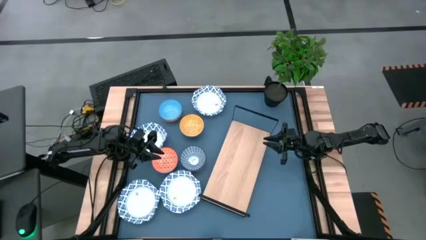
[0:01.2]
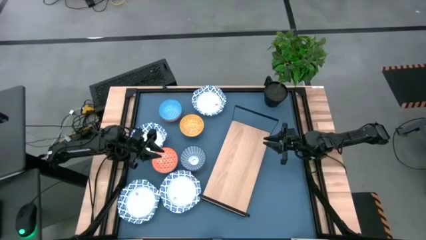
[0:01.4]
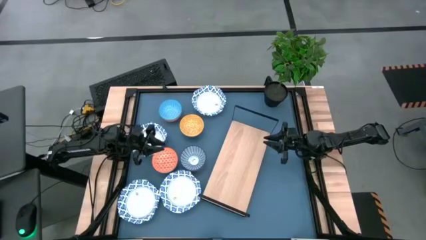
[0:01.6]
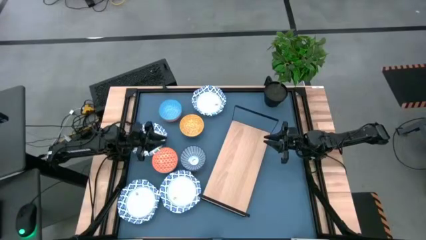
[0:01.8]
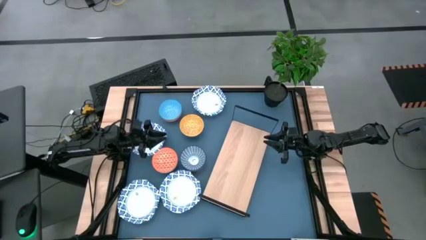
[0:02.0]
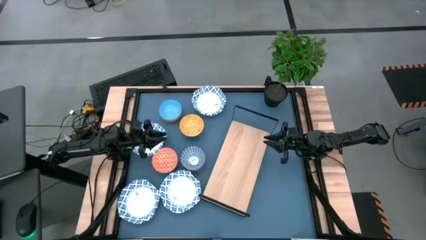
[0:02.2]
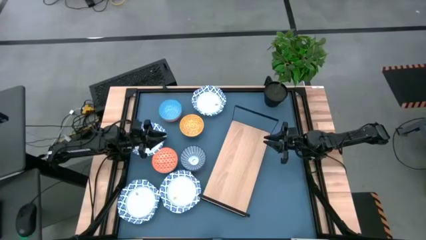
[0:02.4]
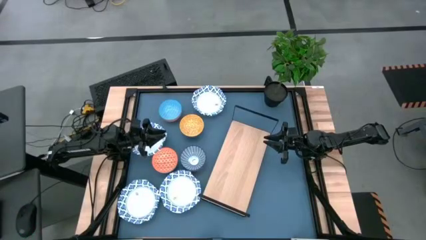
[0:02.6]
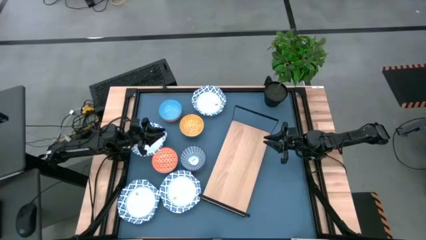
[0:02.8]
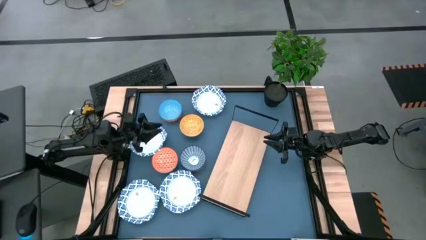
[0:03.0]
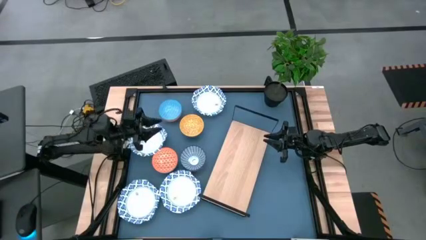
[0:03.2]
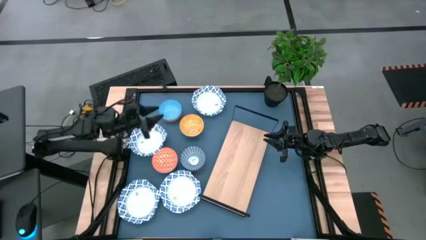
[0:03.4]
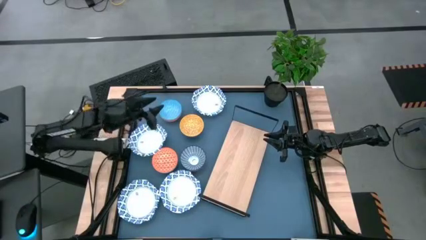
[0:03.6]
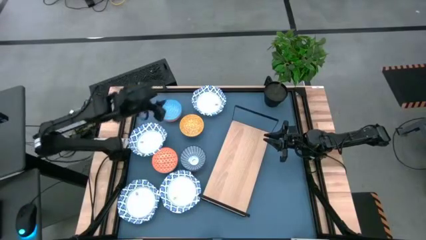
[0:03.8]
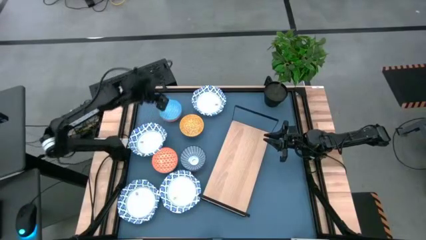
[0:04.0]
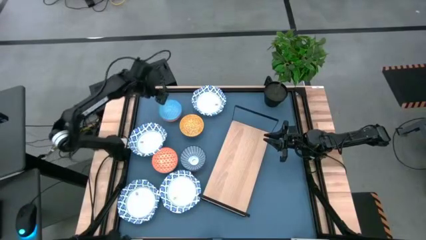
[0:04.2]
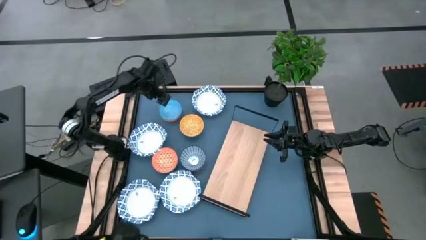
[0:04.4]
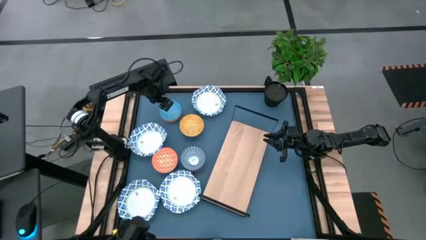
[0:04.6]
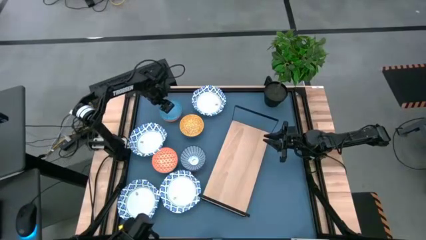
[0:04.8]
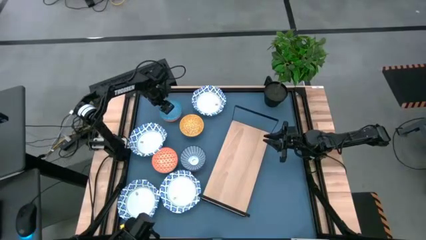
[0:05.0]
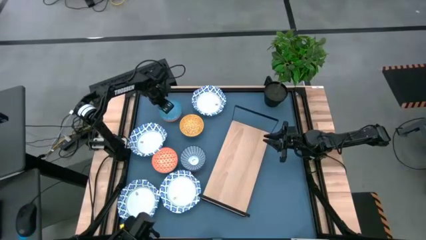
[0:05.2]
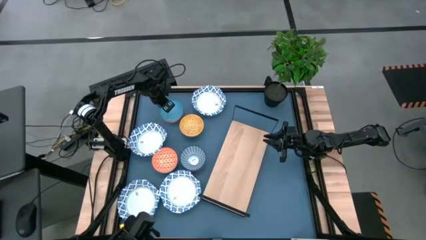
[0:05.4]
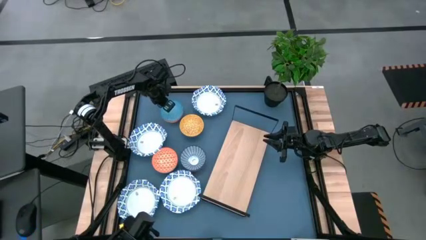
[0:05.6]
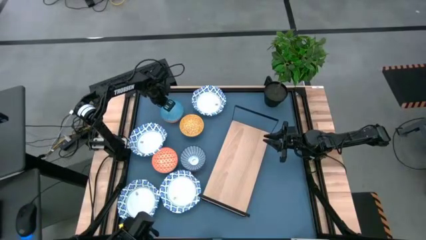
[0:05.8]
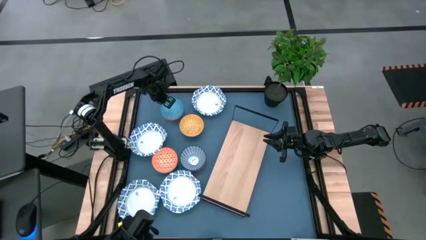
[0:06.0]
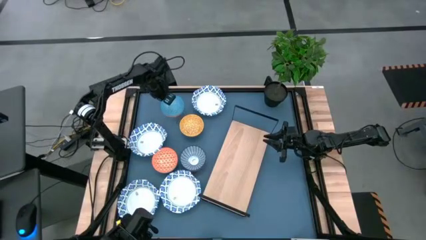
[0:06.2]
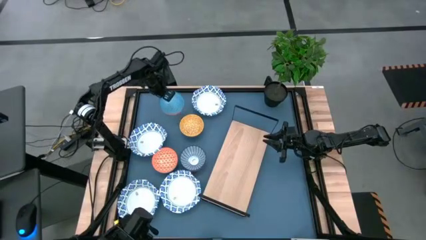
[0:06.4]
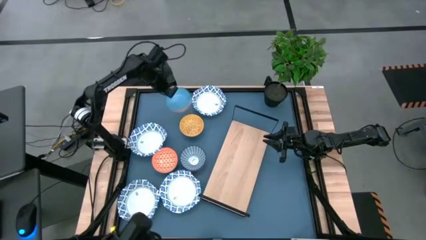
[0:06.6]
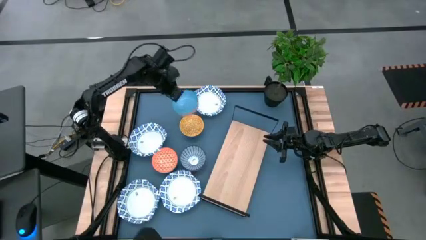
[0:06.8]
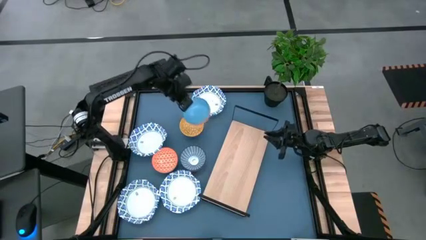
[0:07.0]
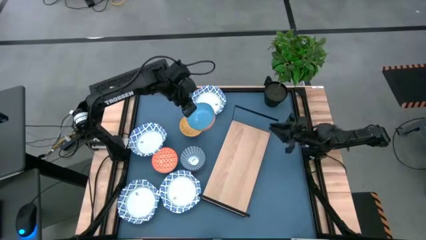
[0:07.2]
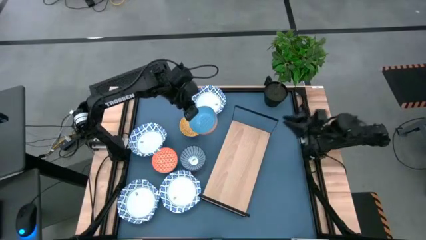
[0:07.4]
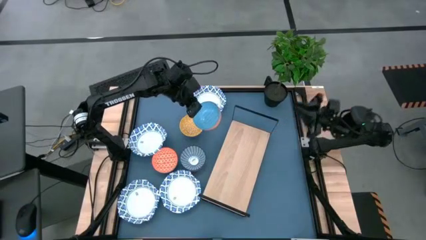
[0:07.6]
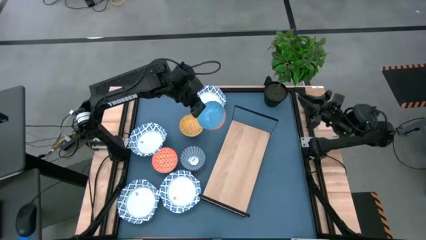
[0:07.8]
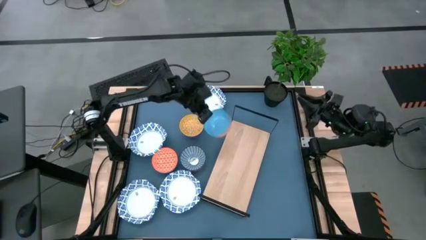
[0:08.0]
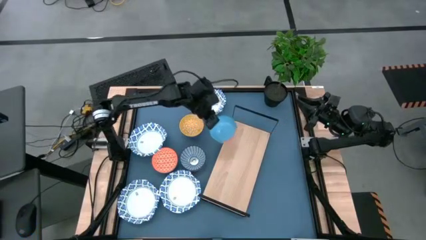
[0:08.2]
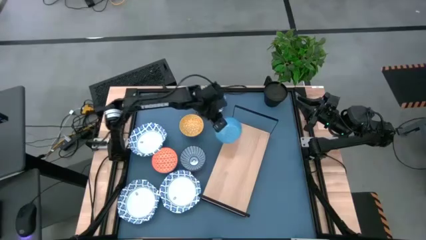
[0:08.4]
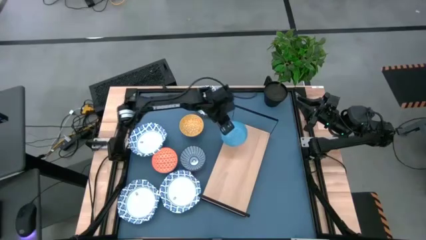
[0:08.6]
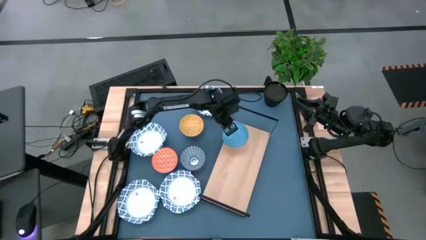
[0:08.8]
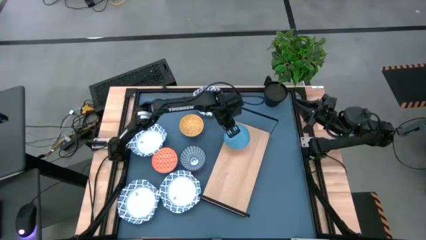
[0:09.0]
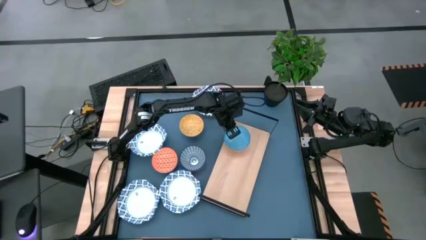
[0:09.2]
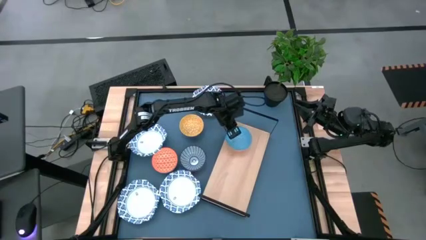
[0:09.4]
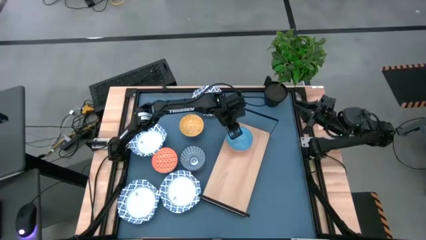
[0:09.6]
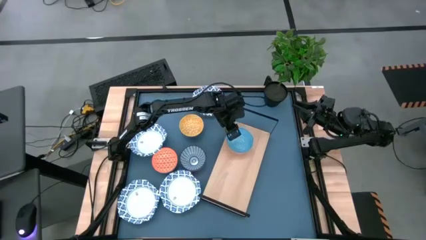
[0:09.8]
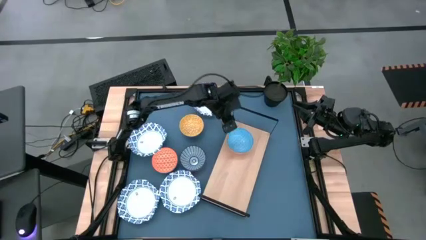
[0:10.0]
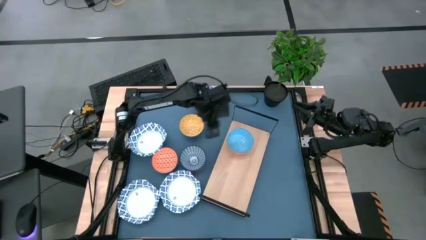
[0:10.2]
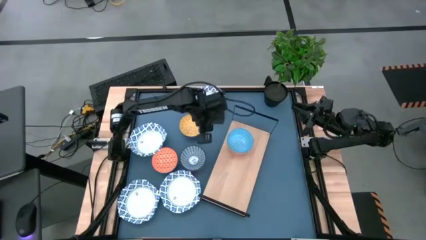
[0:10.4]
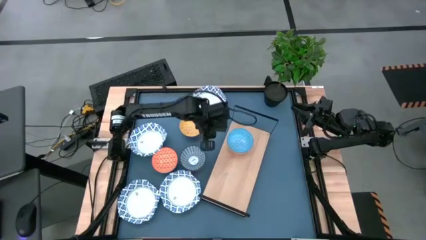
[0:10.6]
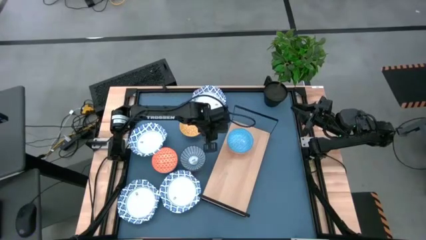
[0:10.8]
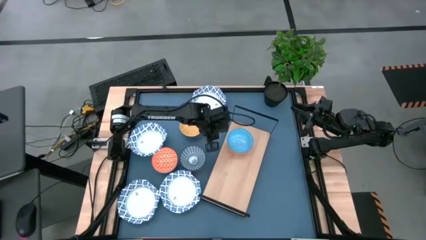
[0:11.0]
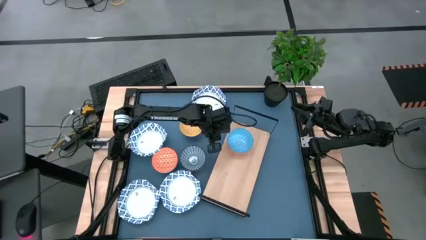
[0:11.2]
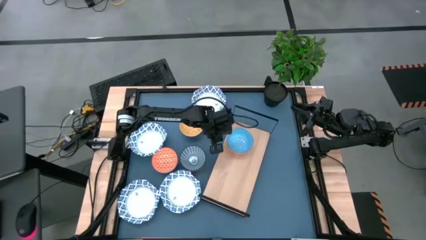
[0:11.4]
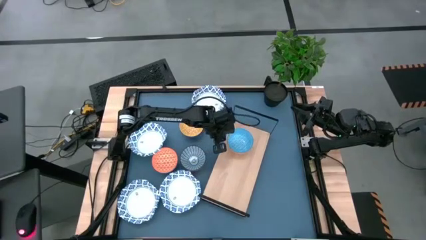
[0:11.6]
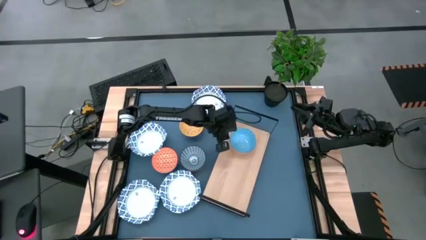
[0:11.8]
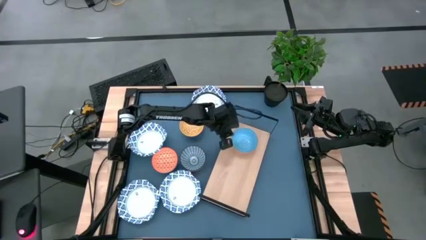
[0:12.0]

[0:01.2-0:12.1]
Task: Place and stack bowls onto a shelf
Put the light blue patterned bowl on the shelf
